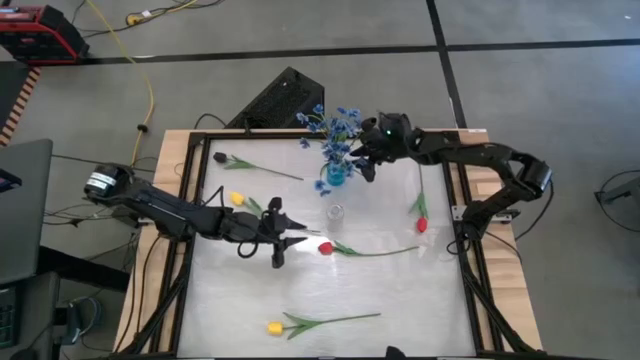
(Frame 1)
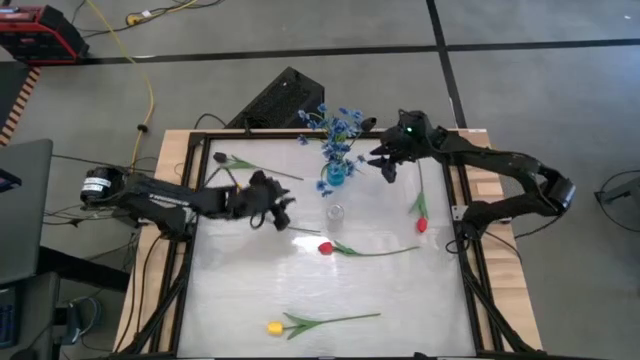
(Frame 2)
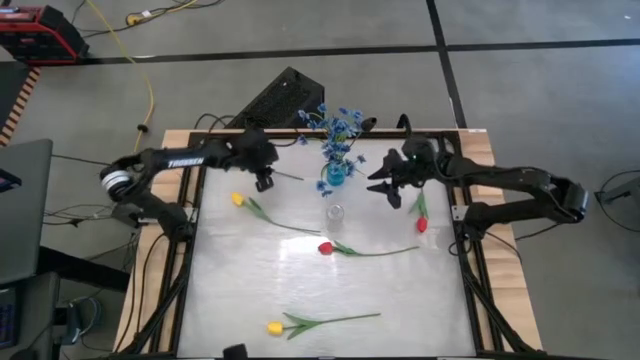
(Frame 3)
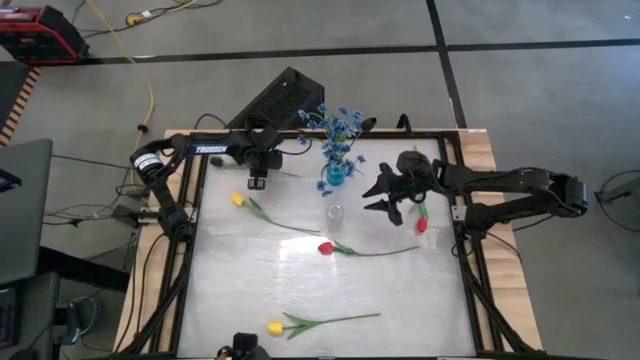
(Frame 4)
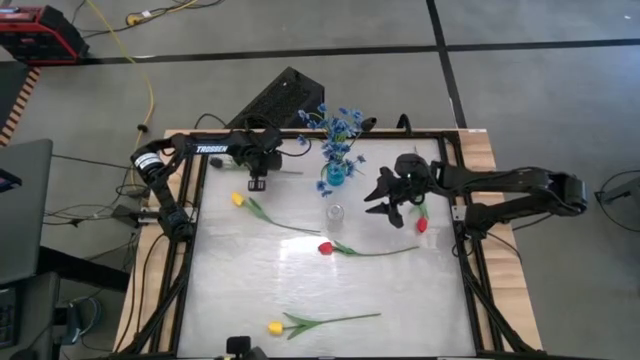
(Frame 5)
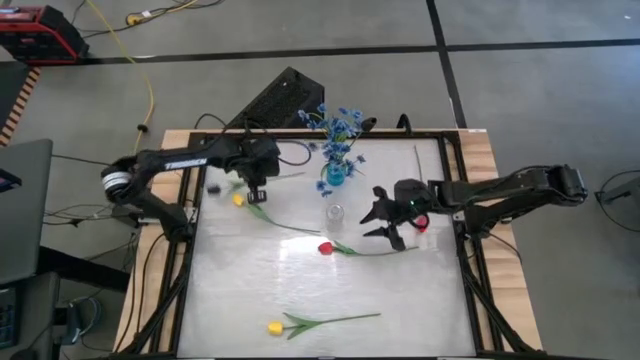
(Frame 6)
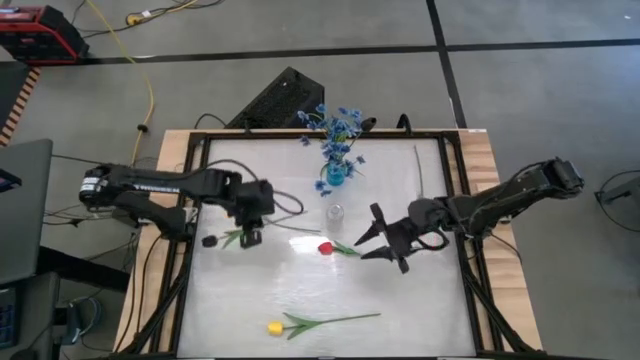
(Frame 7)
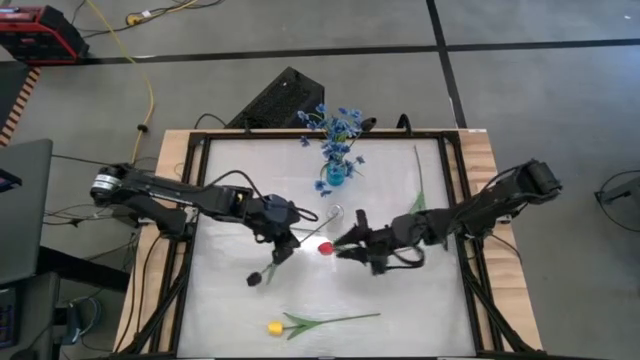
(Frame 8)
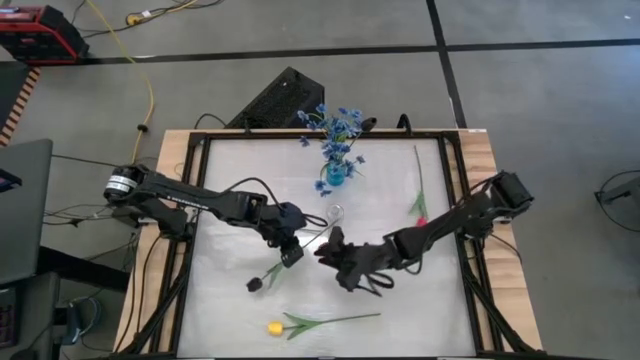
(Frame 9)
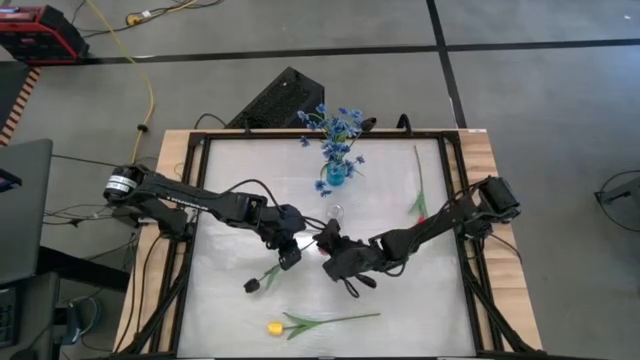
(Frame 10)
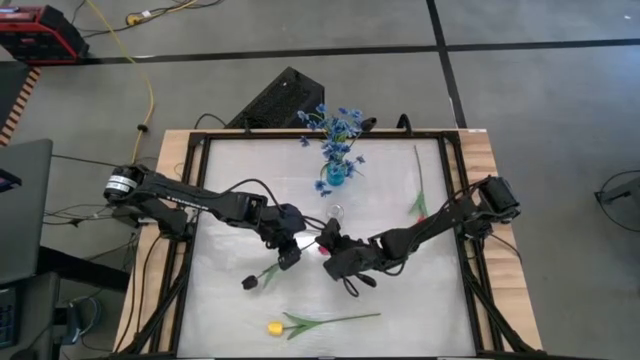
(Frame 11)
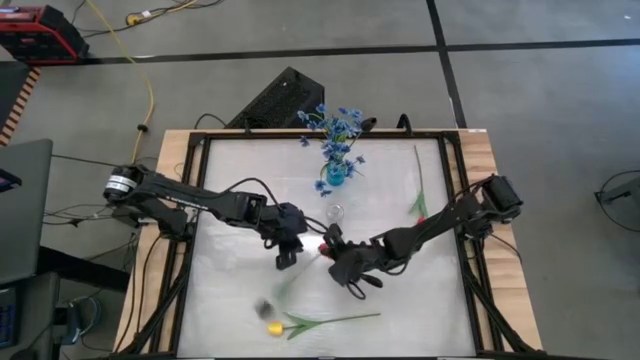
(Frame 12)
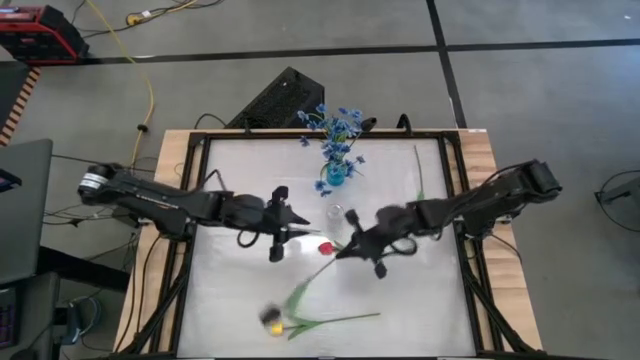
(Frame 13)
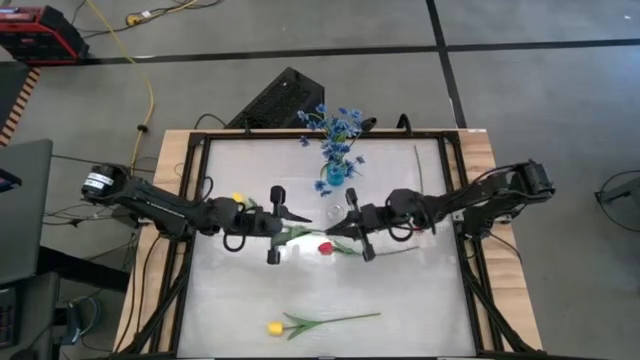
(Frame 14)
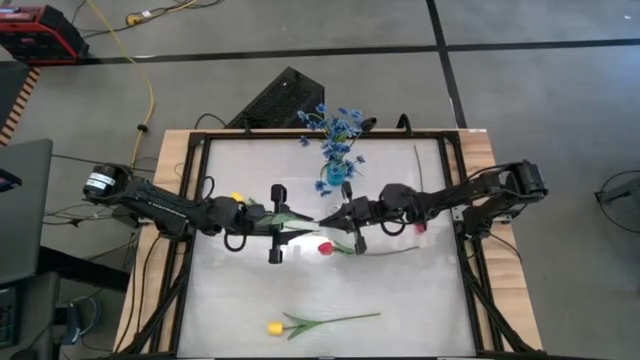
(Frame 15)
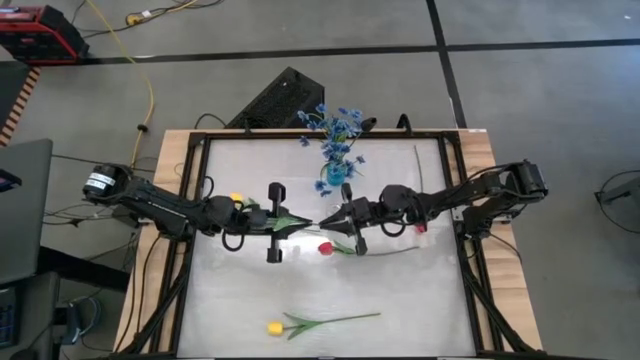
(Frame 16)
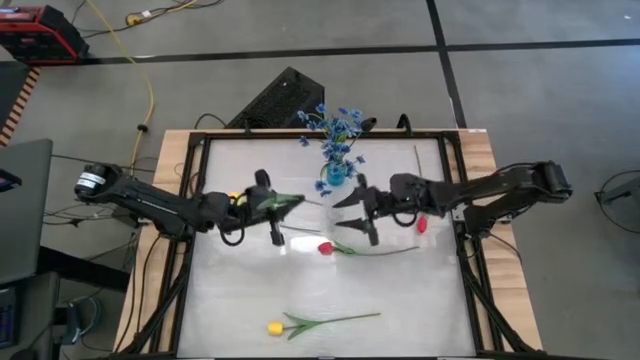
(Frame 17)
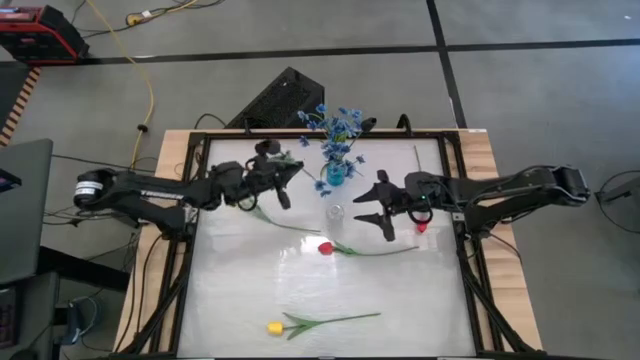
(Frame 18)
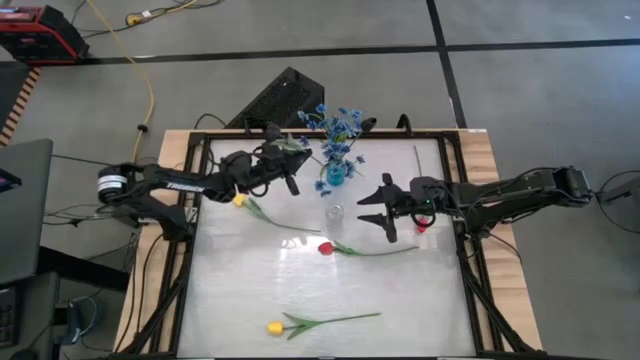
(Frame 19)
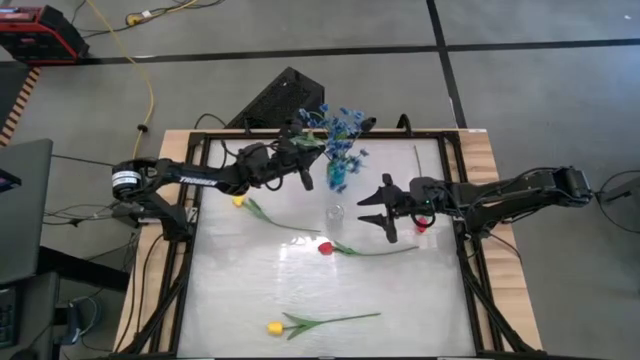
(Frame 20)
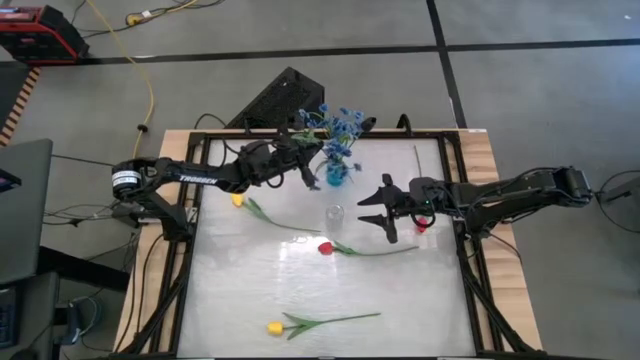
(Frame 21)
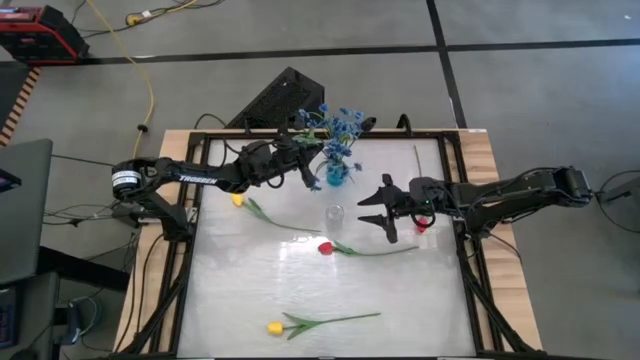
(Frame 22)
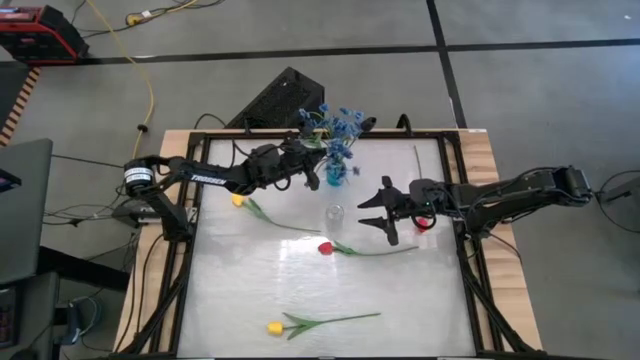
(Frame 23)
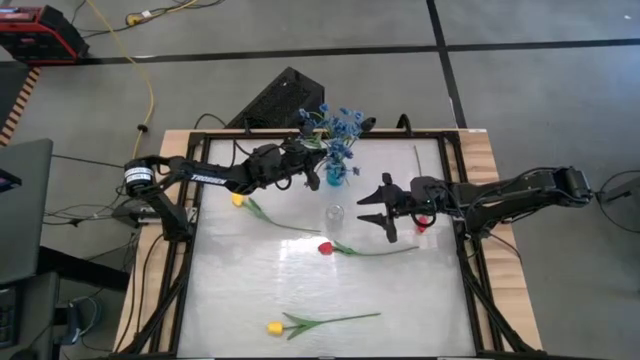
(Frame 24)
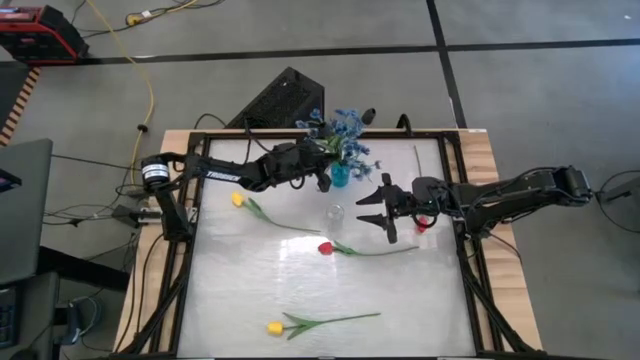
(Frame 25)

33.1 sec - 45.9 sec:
Task: Sort flowers into vase by color
Put the black flower into the blue vase

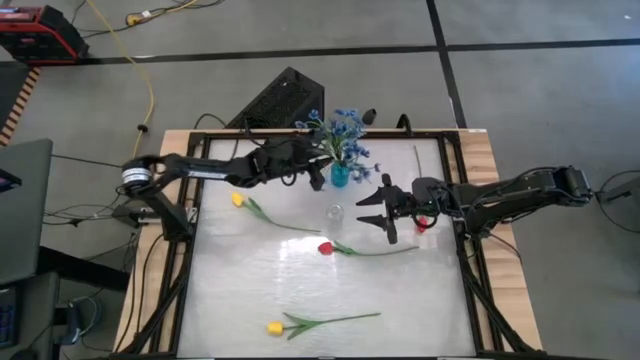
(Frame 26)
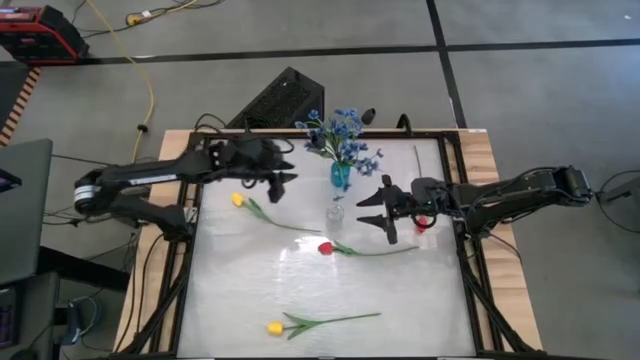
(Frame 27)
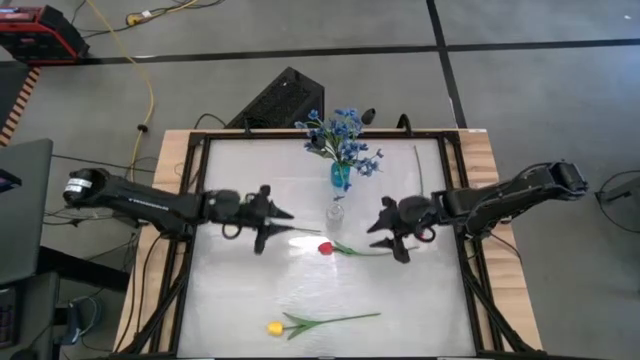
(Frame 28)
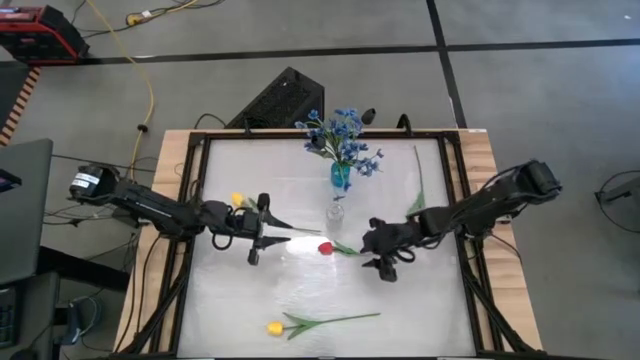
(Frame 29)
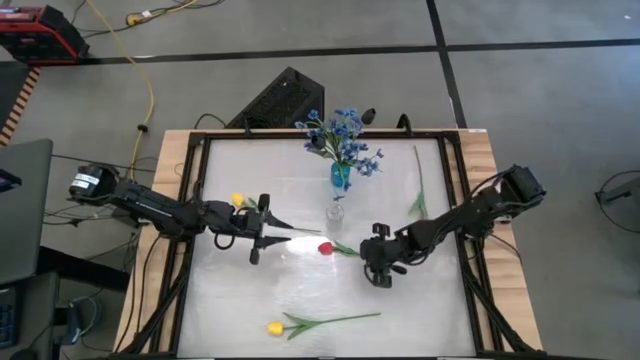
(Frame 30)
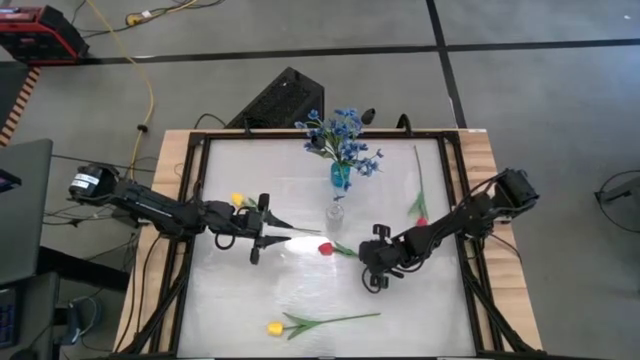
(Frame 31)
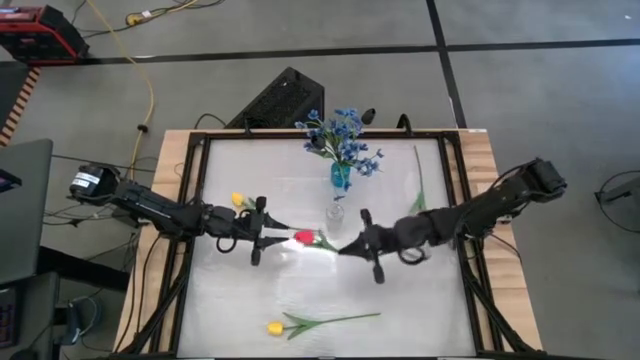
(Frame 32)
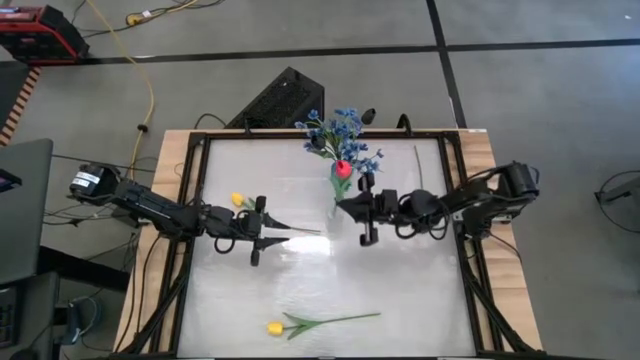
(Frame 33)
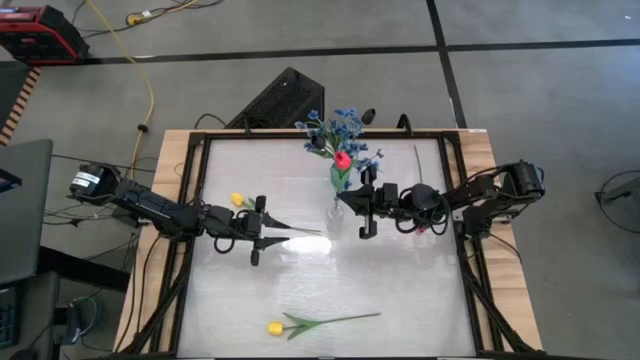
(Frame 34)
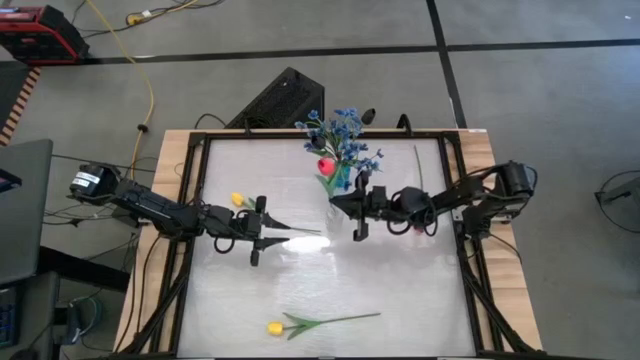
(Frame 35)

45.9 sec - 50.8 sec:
Put the left red flower into the transparent vase

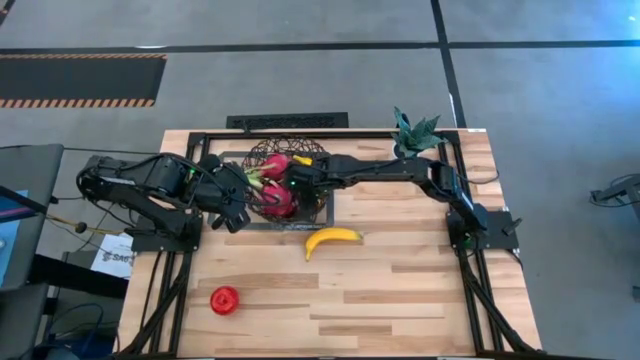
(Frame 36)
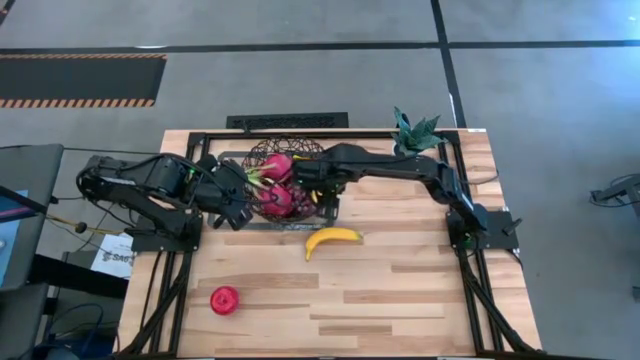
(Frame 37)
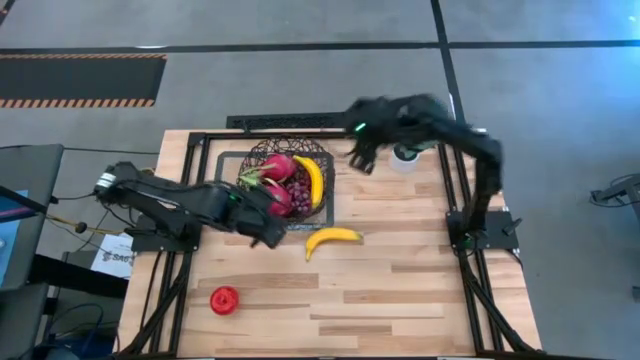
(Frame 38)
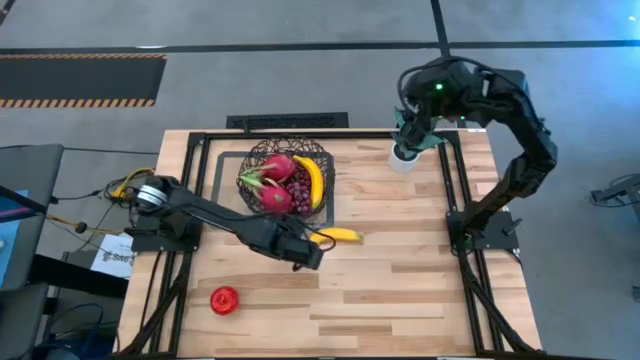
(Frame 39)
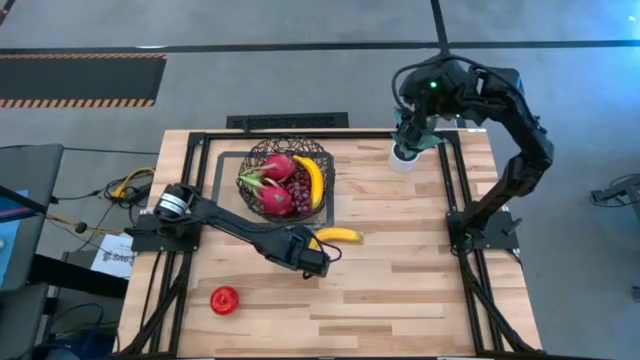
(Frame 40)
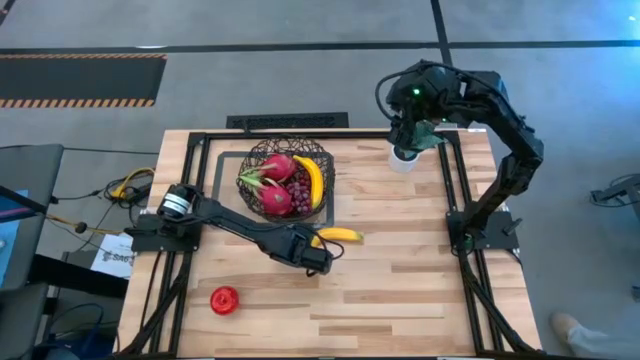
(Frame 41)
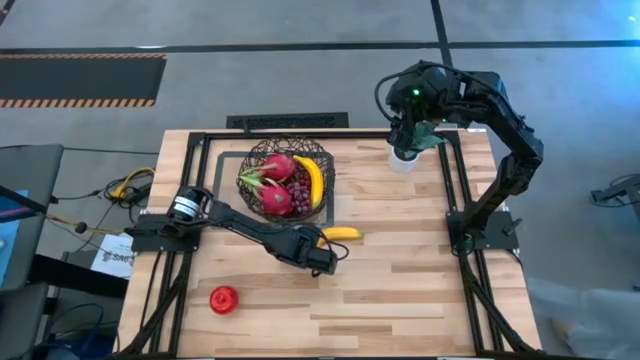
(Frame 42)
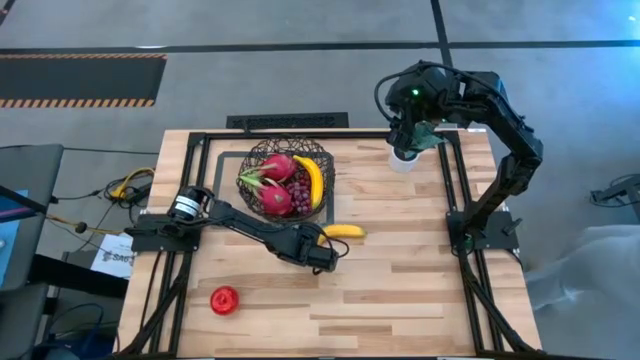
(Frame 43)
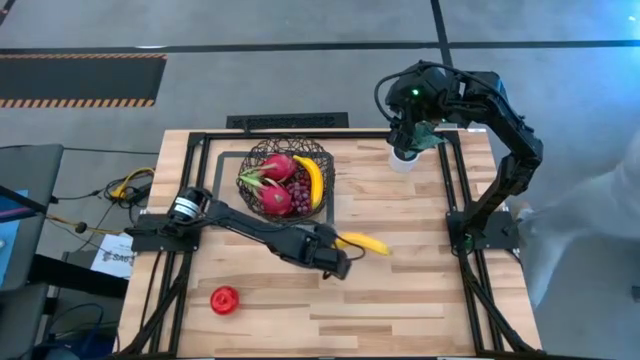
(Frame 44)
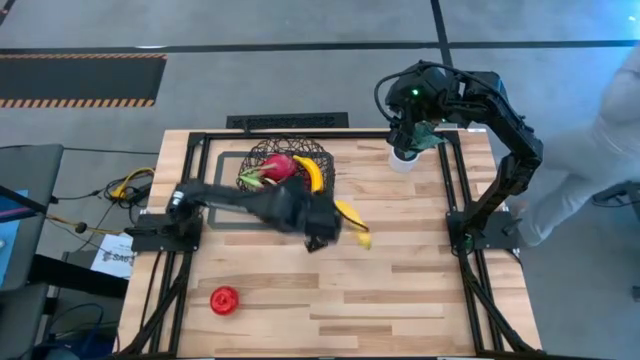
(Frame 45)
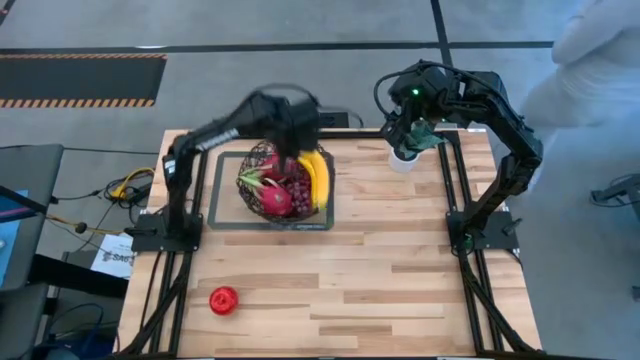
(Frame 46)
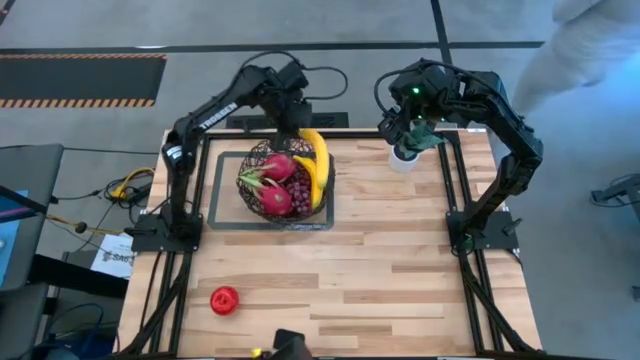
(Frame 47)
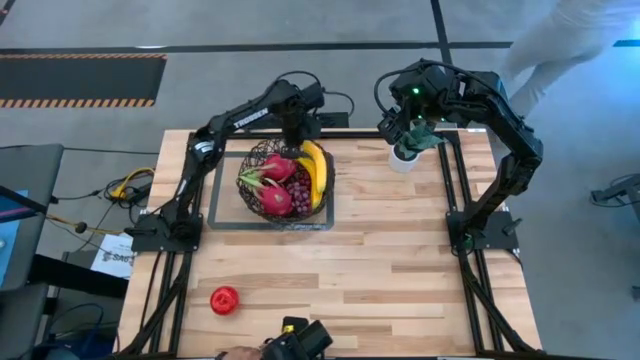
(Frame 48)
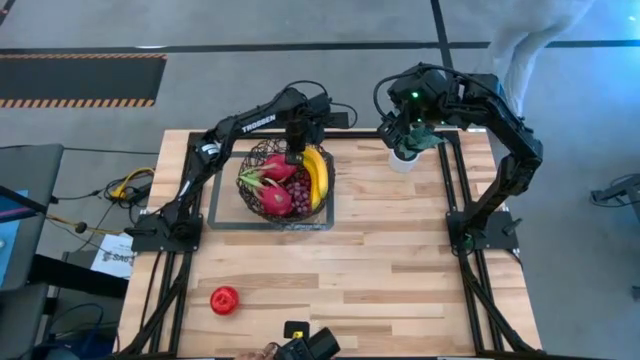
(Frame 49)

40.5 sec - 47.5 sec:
Task: Build produce basket
Put the yellow banana into the black wire basket
